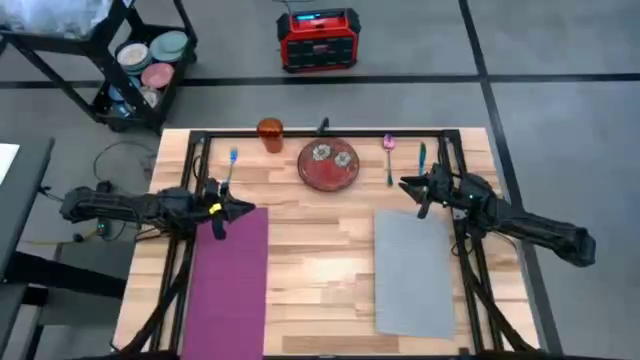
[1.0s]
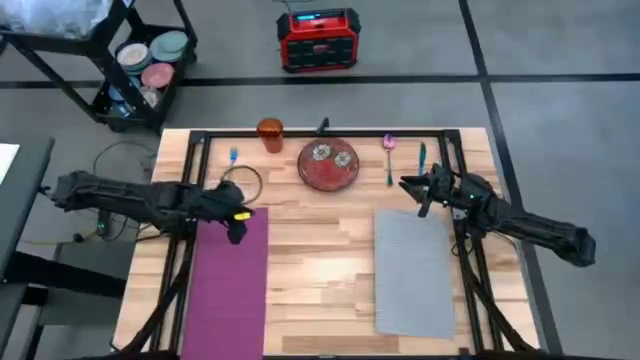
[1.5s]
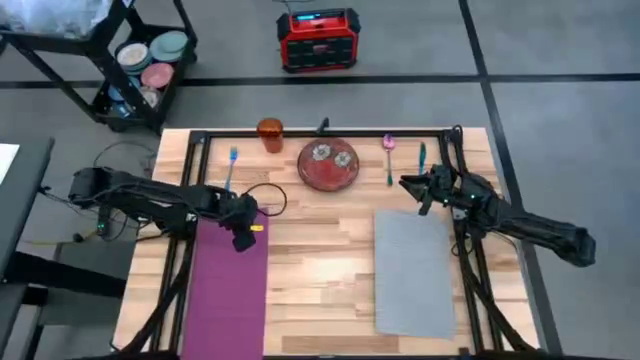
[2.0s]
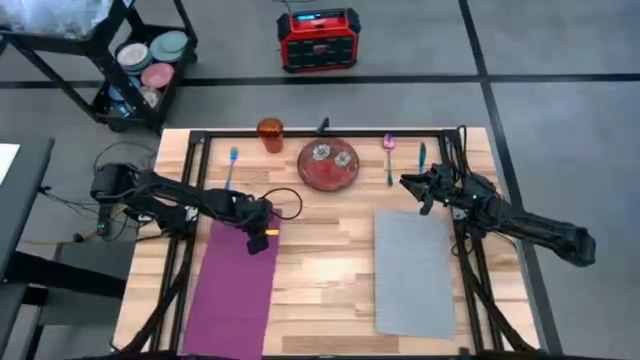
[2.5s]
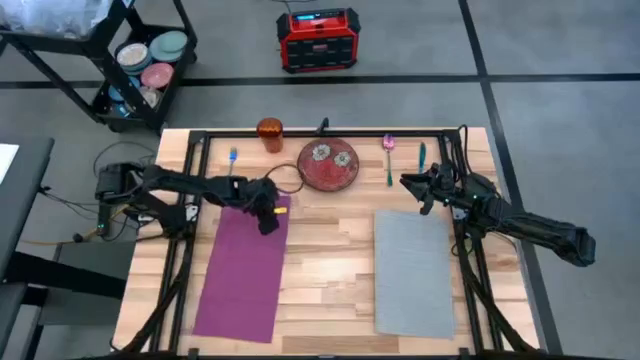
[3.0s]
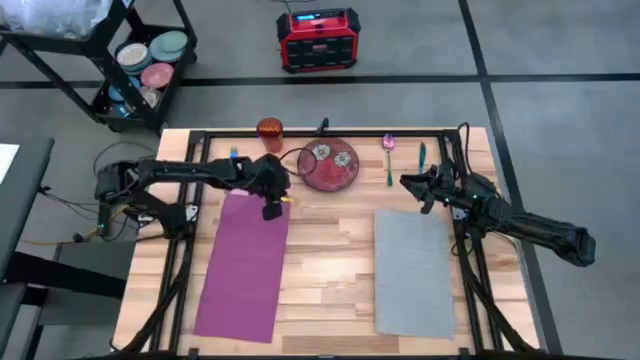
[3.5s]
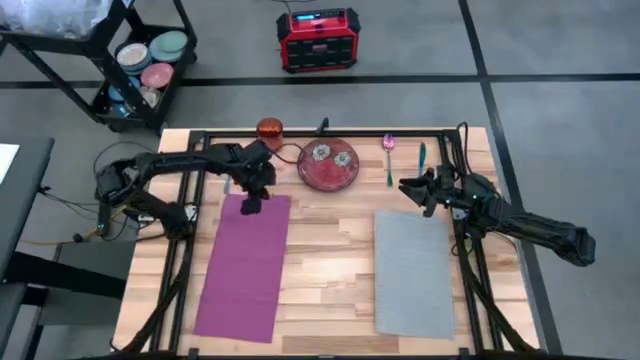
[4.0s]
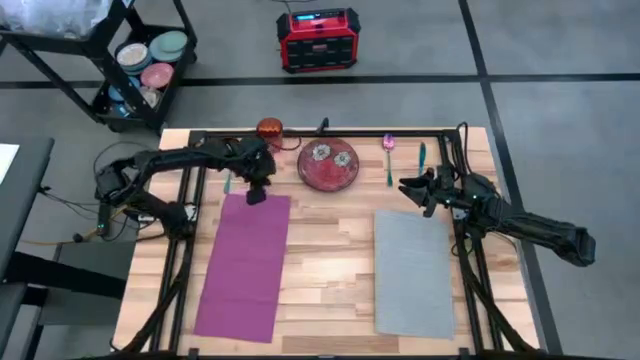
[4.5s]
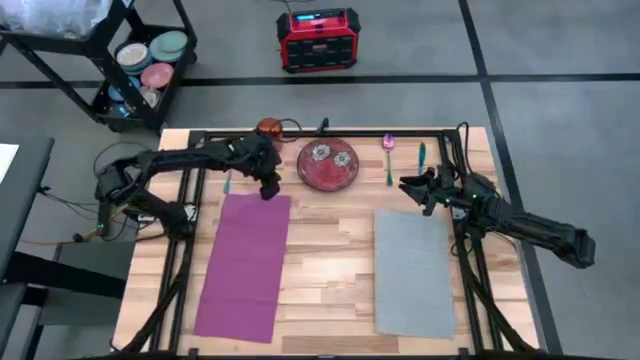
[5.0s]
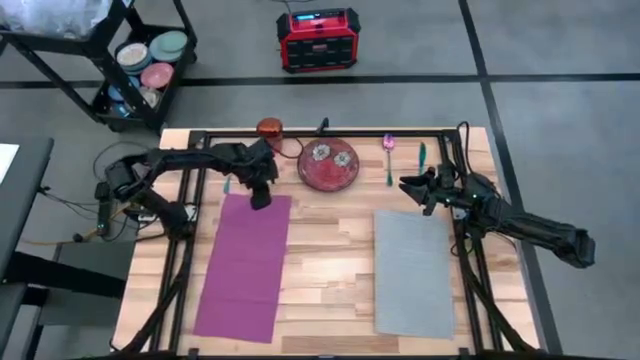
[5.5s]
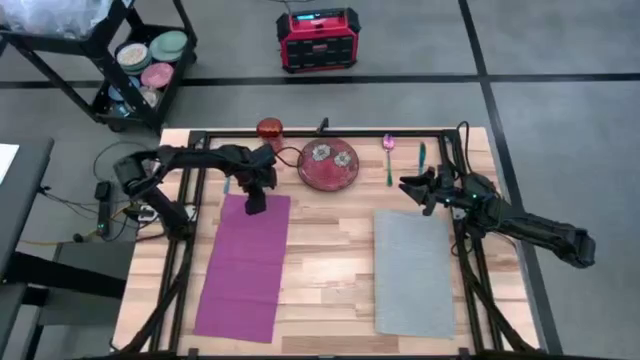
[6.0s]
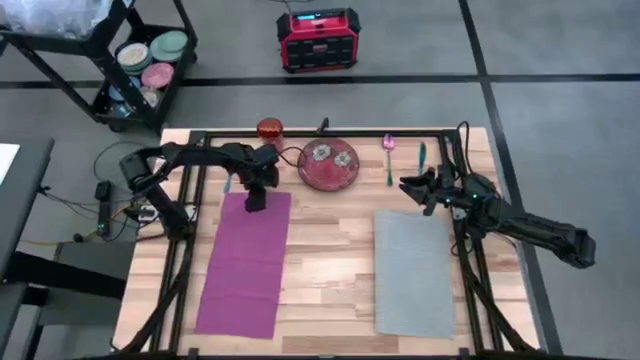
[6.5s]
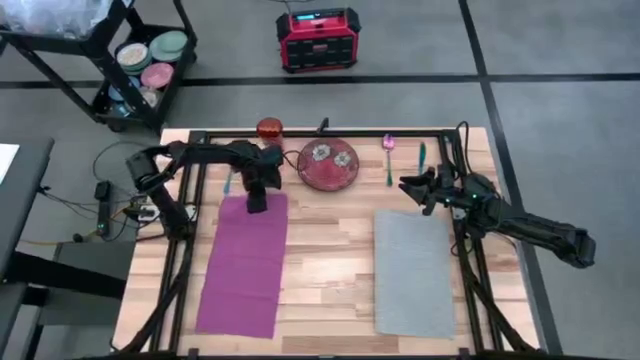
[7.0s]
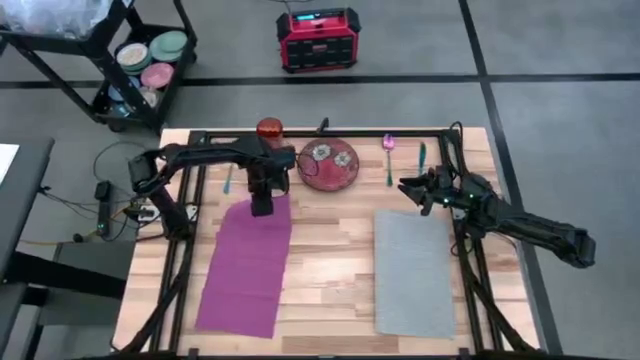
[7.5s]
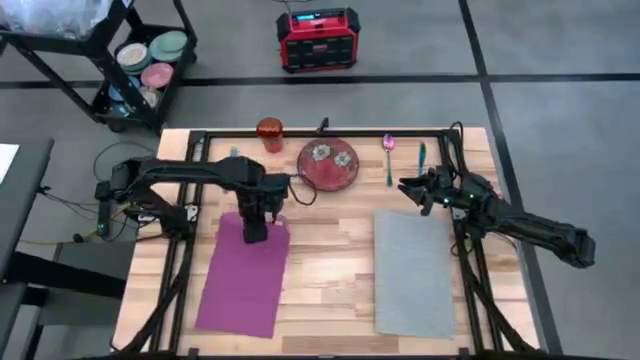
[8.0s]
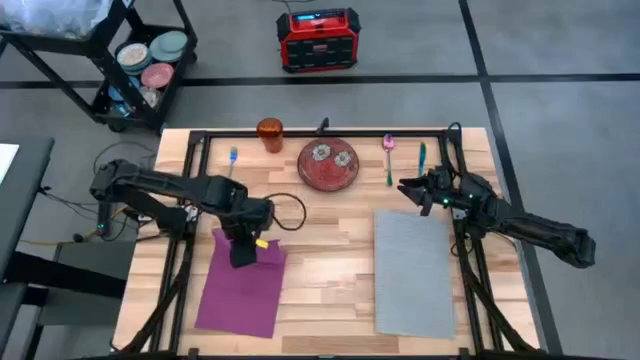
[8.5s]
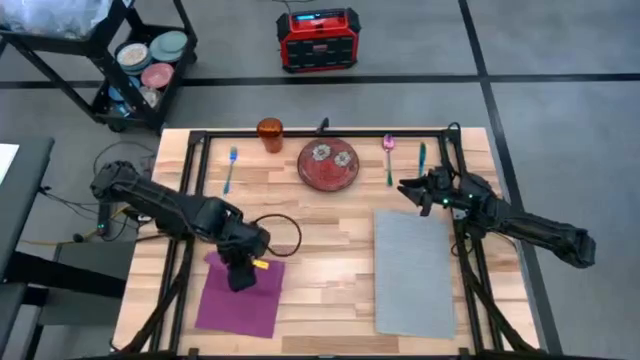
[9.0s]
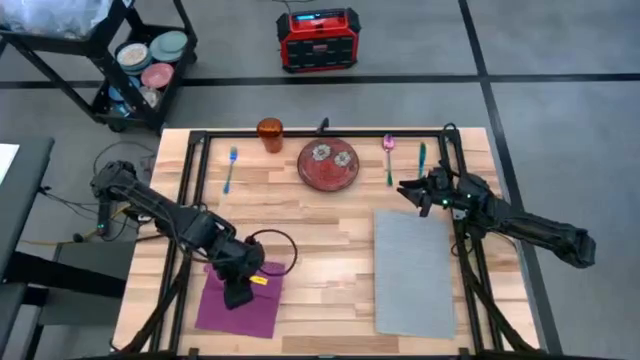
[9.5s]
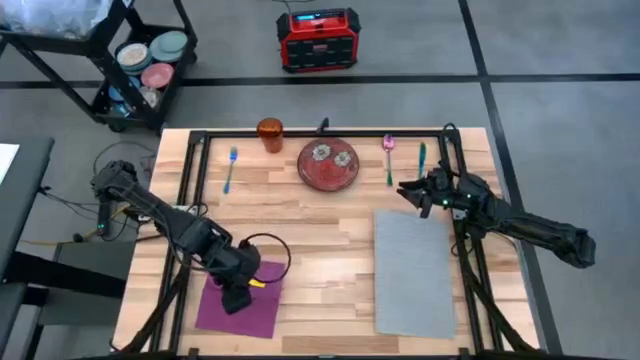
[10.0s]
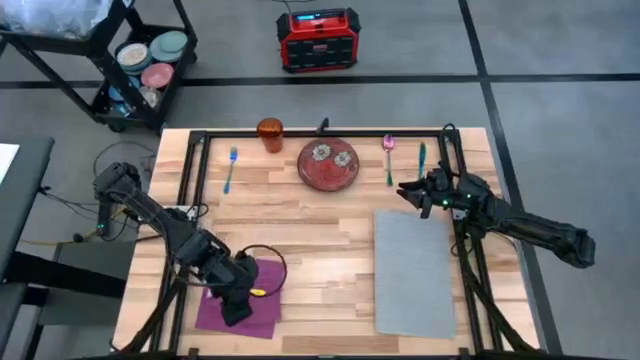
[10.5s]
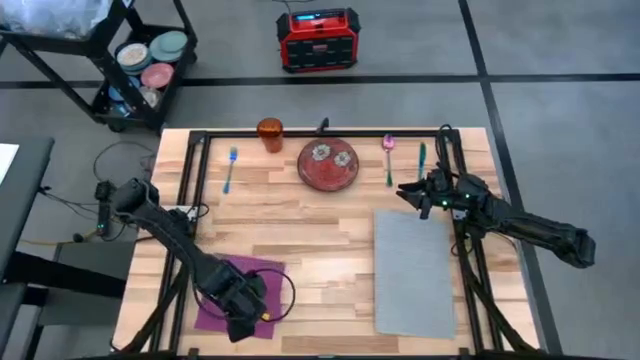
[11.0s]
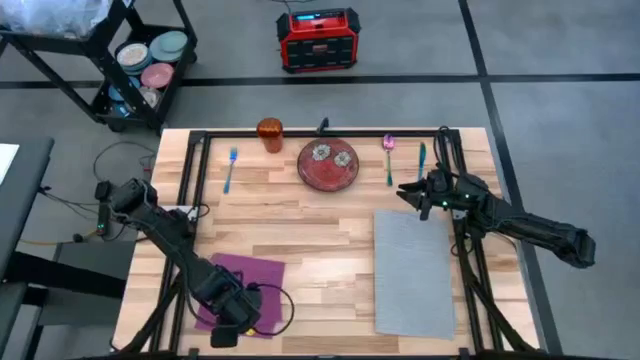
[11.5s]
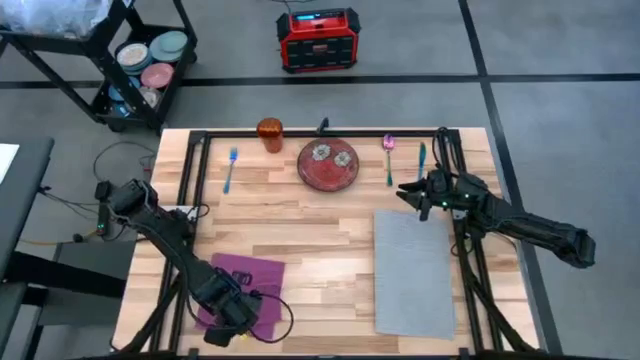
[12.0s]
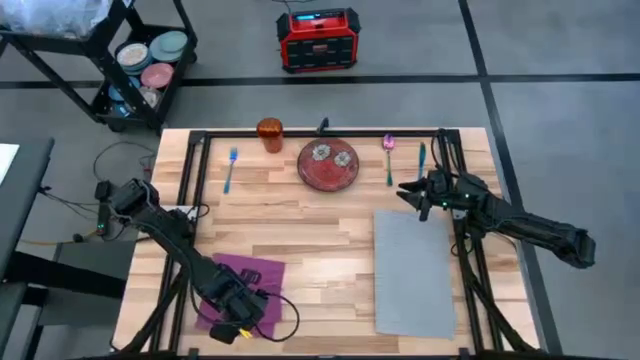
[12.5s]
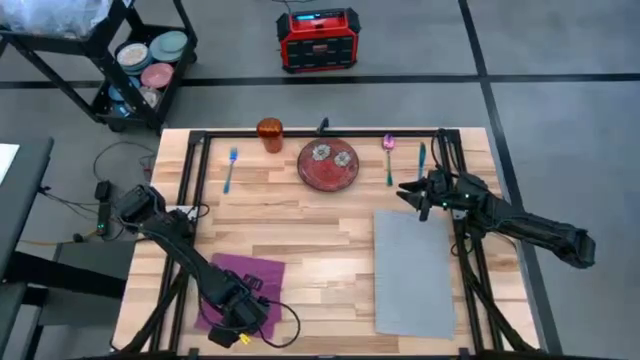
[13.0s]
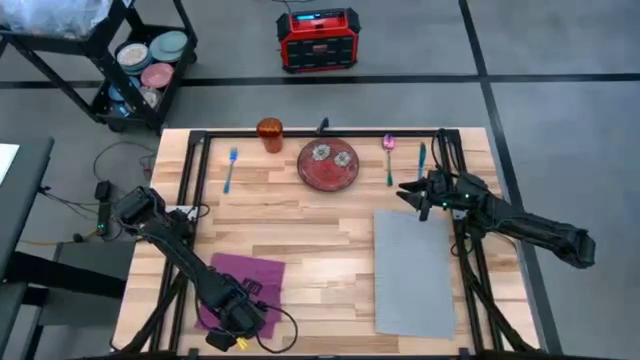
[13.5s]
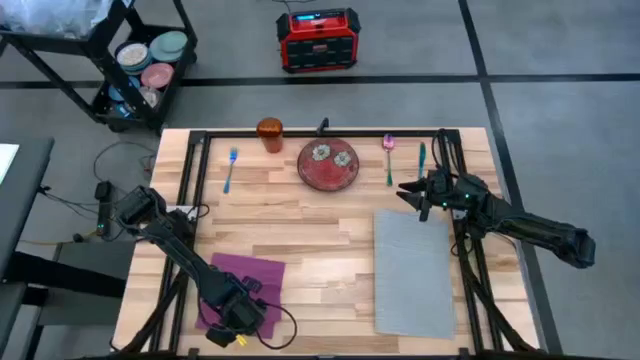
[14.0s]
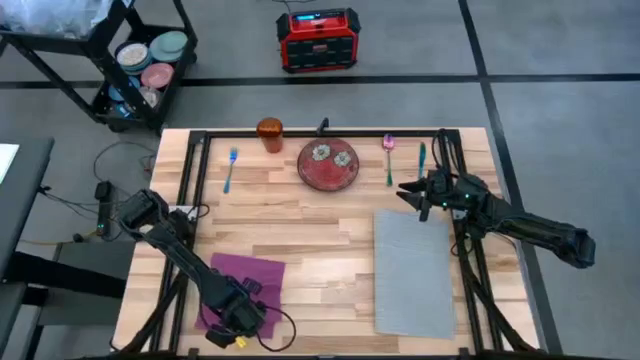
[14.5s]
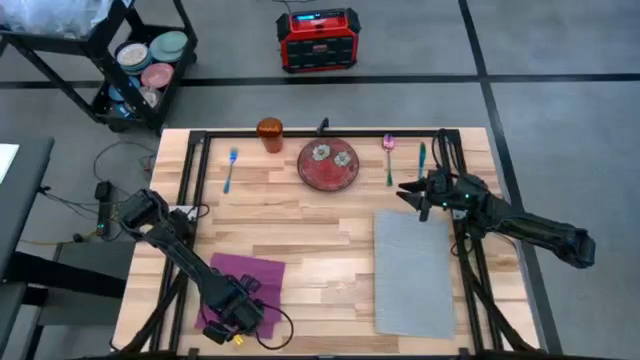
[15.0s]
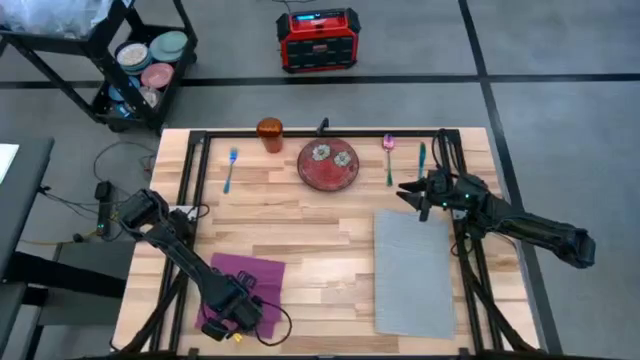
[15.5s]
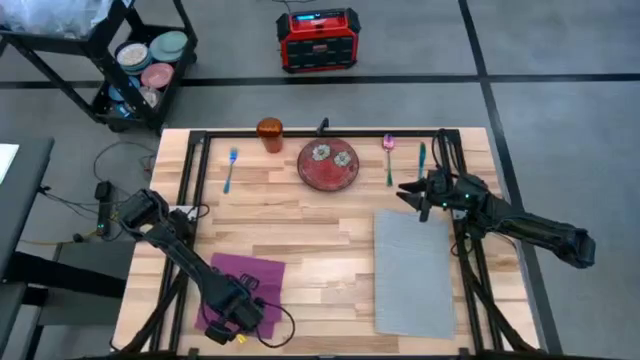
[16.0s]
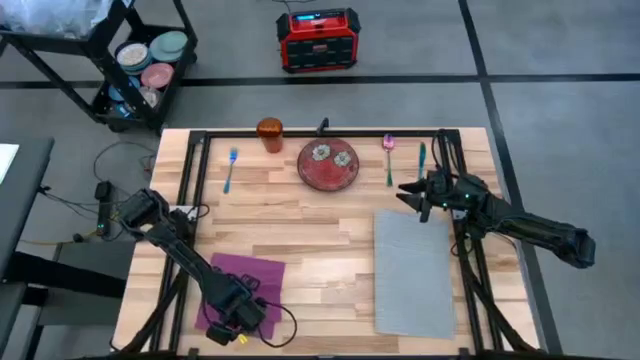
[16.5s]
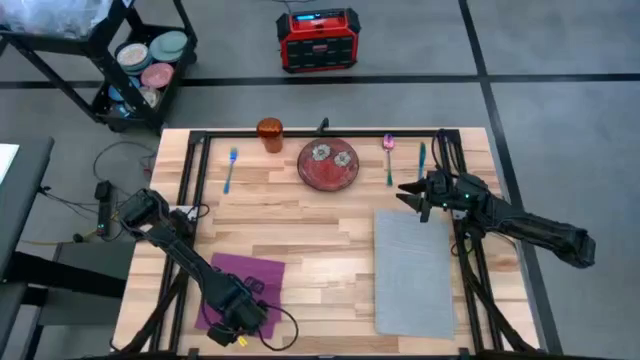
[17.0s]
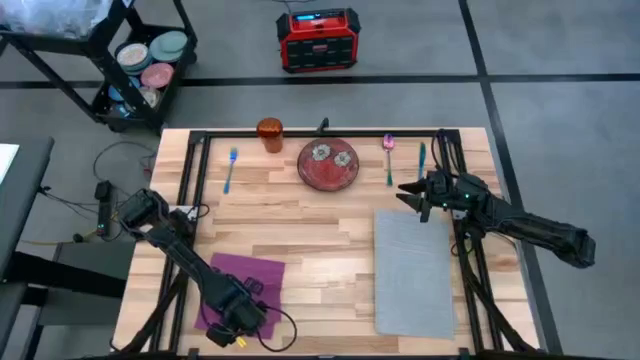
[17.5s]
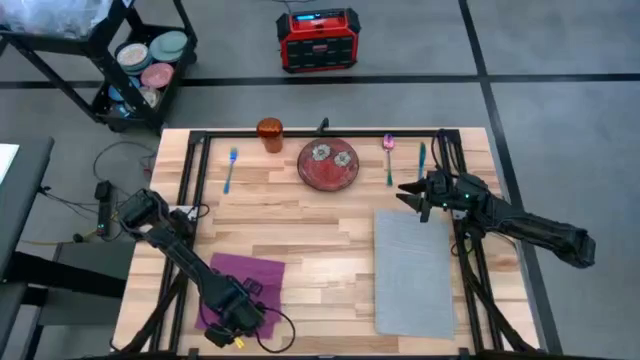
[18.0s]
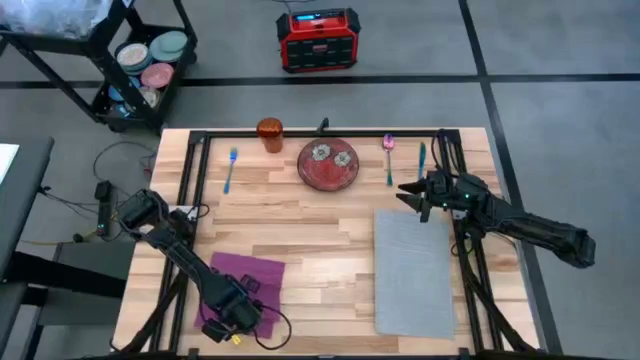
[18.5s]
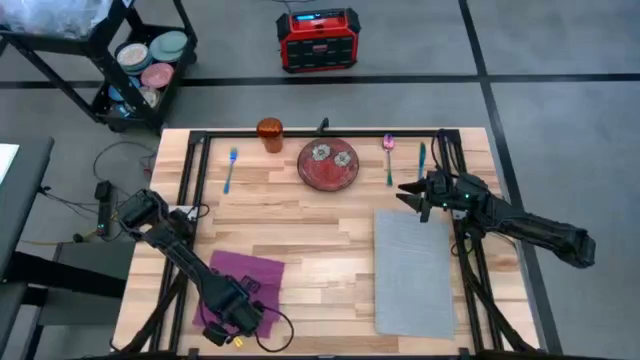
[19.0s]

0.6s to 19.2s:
Task: Set table place
Fold the purple table napkin

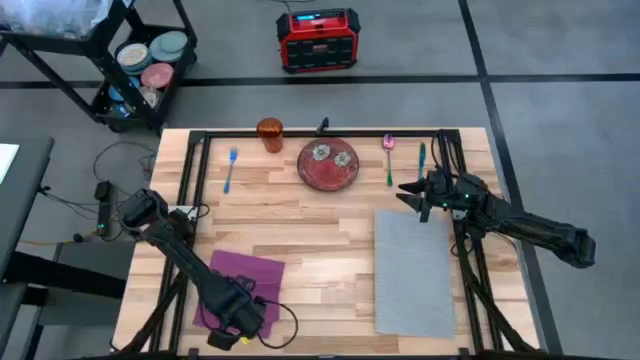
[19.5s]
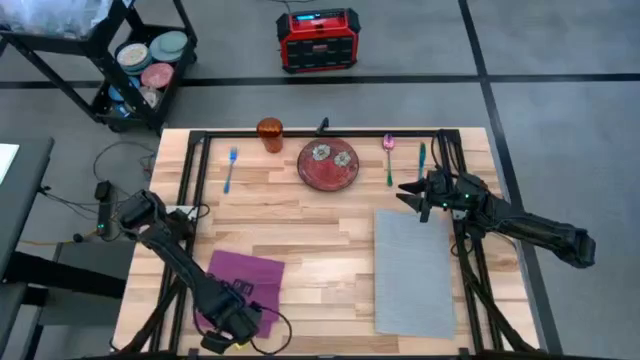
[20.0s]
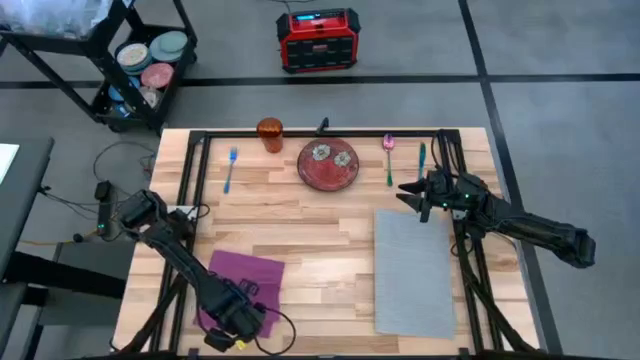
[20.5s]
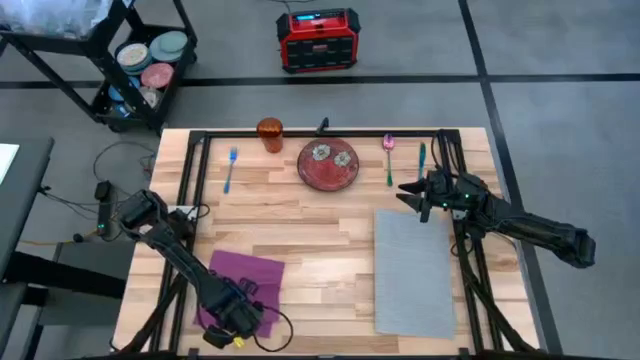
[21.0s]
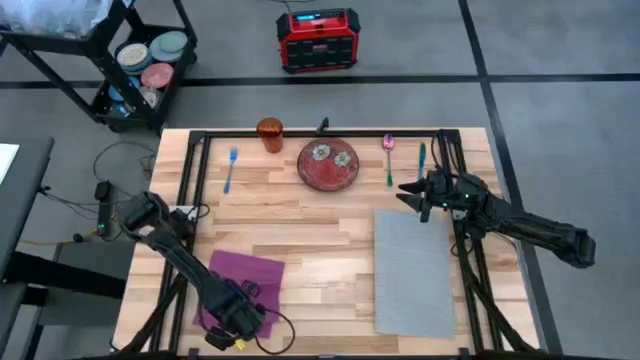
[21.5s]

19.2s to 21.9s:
Fold the purple table napkin
